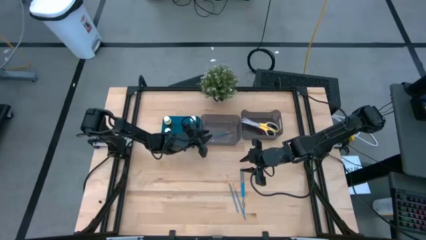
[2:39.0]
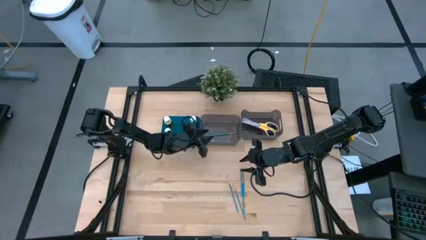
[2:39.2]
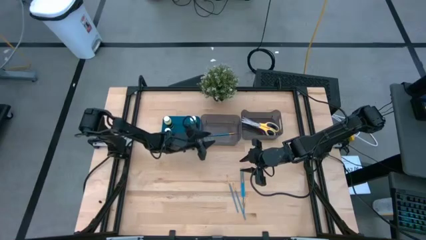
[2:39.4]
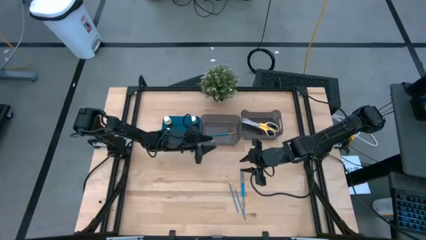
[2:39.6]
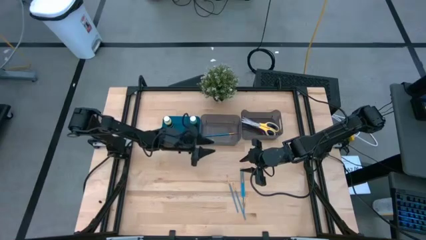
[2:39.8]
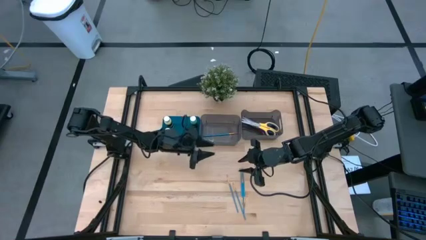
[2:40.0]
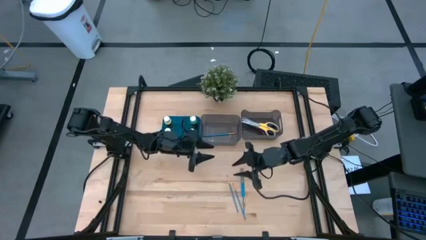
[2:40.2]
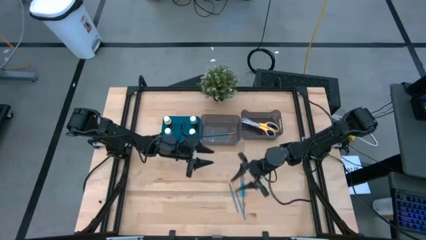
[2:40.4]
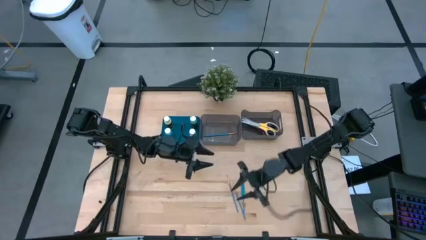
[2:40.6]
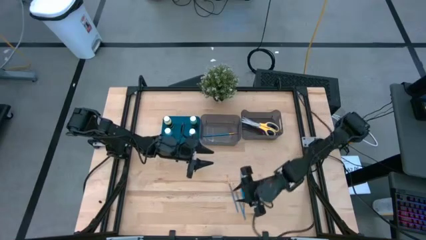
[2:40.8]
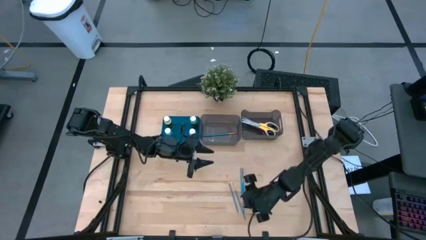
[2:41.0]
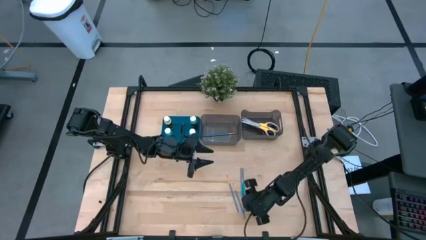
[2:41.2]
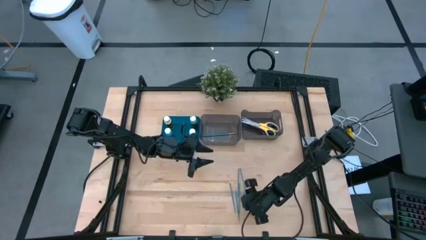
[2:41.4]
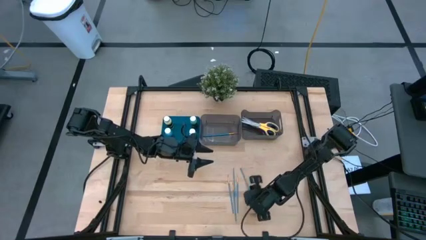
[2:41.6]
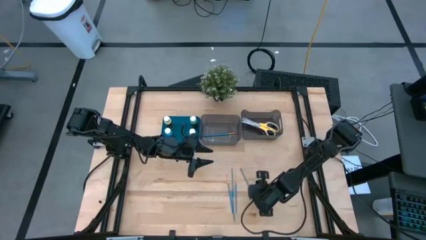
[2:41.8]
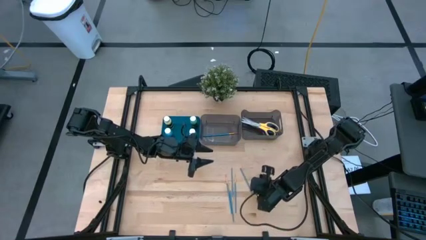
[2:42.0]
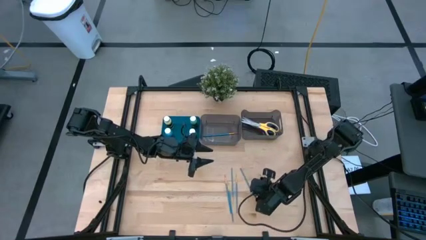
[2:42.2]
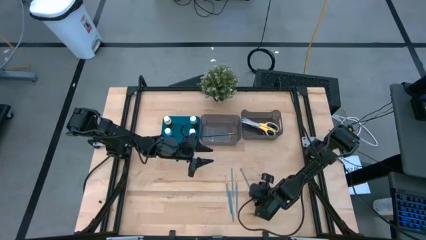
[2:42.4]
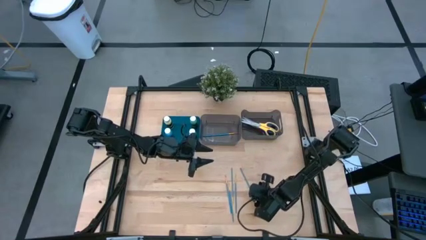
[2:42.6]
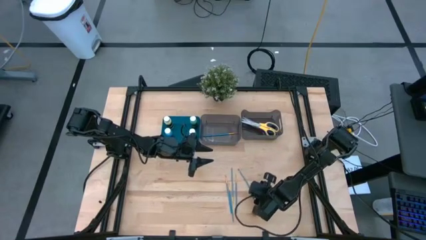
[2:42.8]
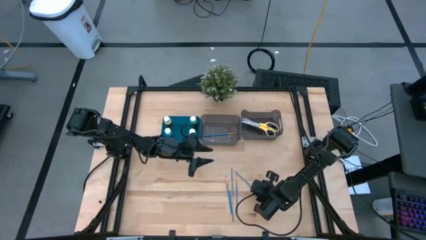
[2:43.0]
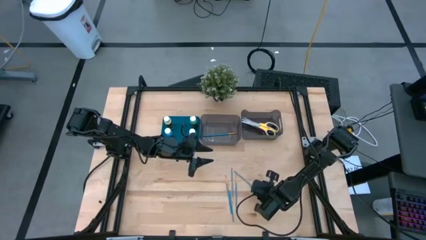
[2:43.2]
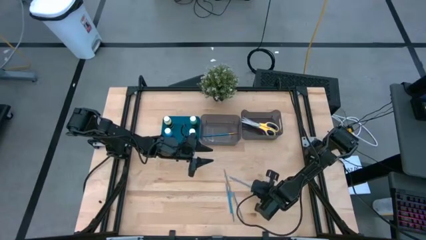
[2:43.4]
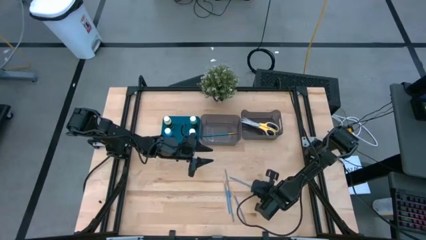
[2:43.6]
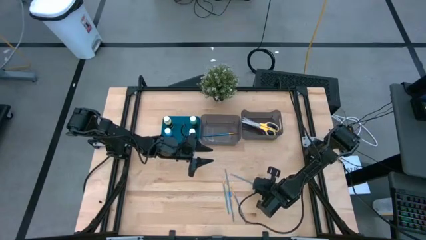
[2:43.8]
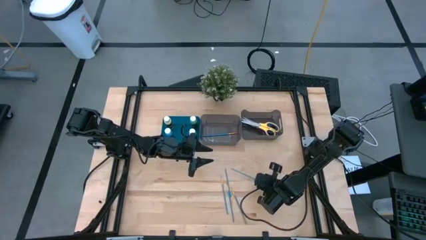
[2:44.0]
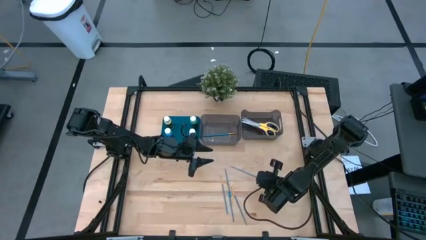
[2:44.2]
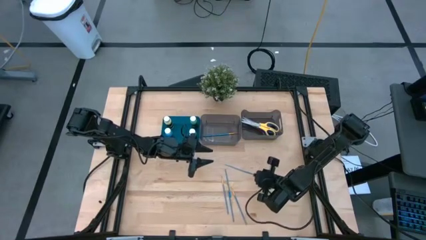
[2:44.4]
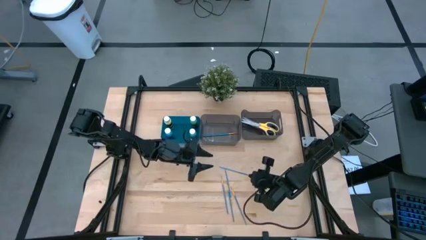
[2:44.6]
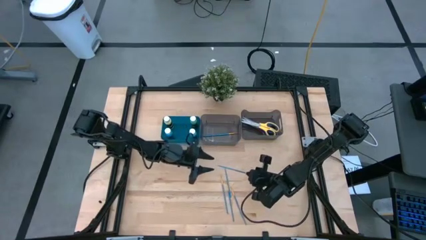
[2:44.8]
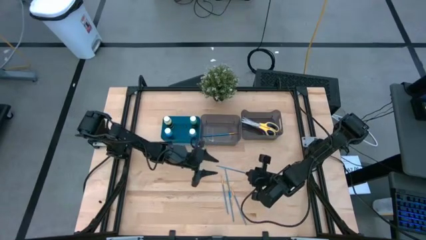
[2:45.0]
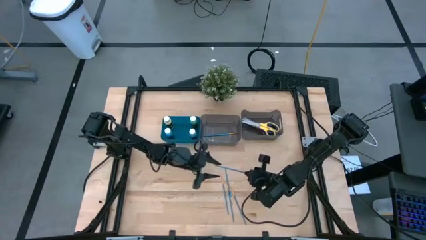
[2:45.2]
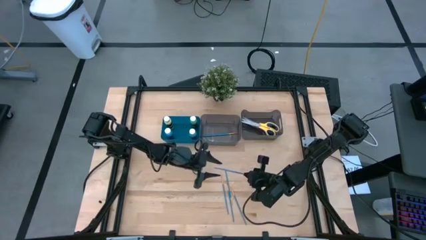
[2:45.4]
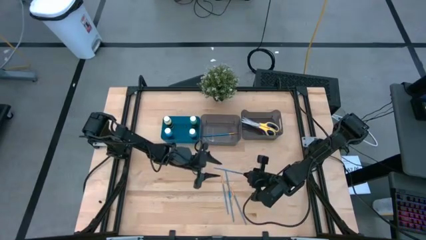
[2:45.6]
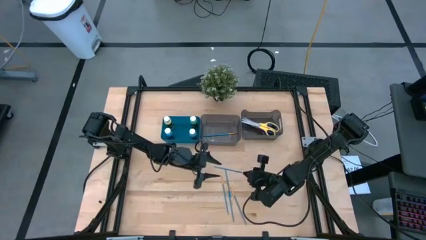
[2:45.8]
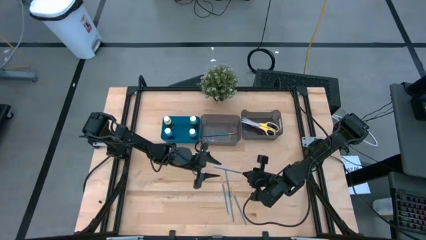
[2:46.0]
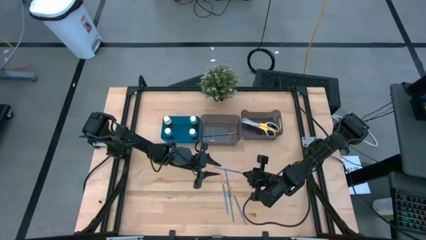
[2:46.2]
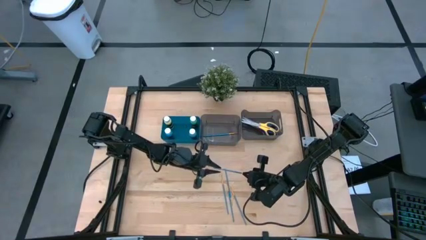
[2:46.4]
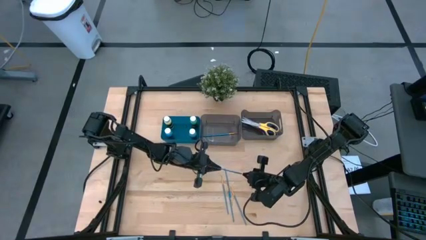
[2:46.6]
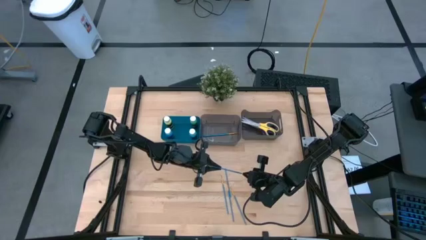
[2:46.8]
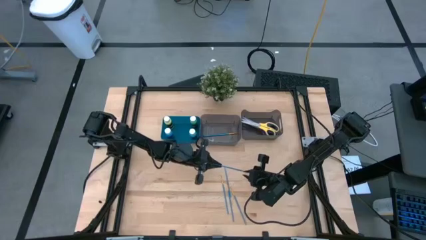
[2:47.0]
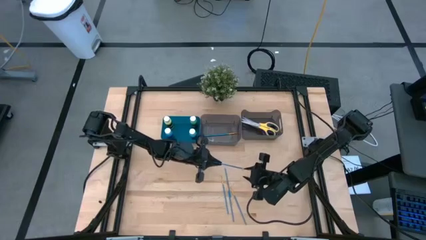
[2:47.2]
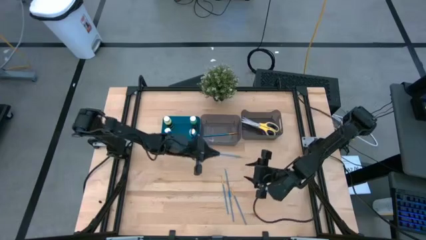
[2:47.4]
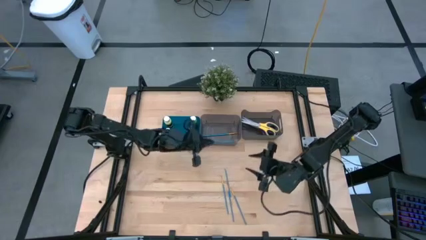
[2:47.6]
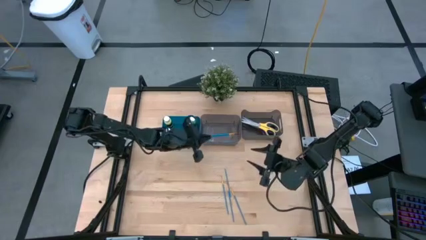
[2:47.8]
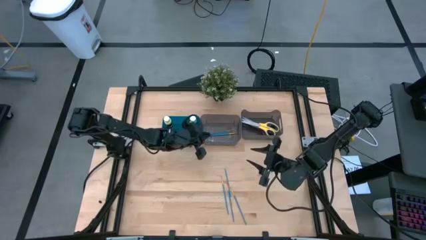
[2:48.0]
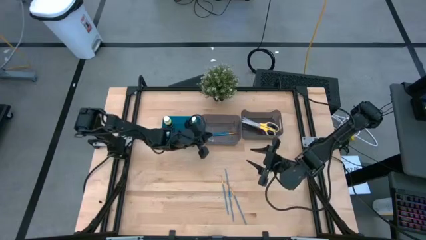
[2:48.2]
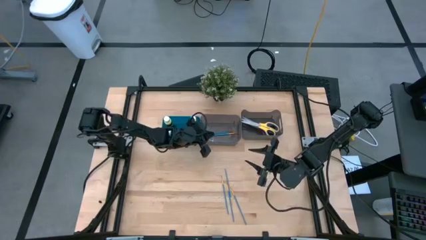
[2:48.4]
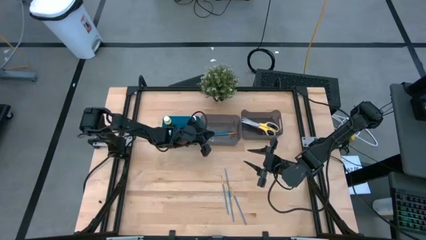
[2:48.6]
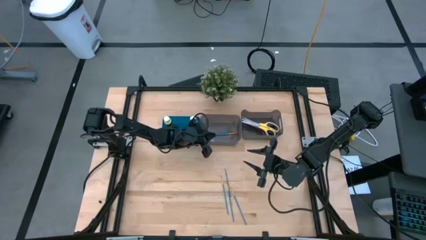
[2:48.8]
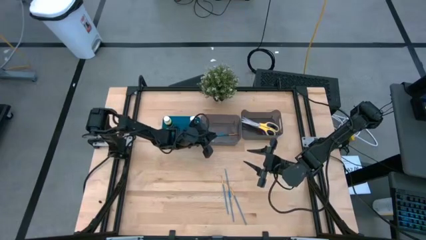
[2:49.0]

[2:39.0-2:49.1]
Task: Pick & Place Paint Supplies
Put the paint brush into the left black bin

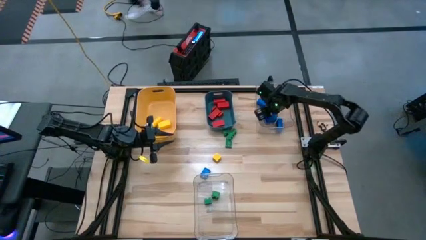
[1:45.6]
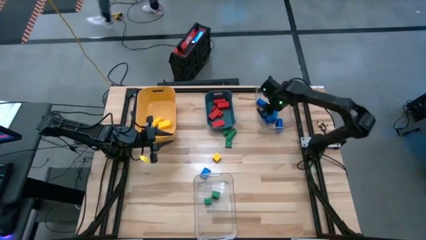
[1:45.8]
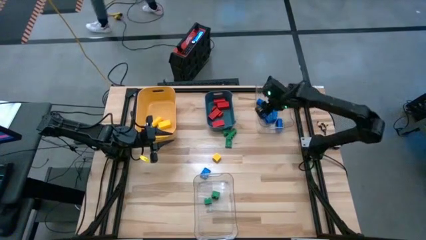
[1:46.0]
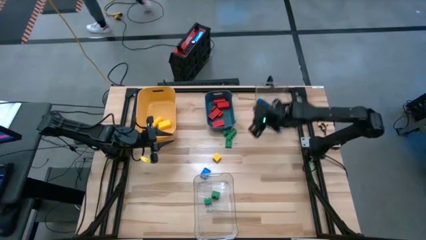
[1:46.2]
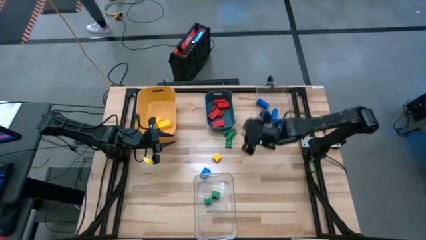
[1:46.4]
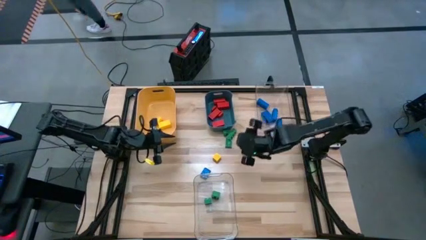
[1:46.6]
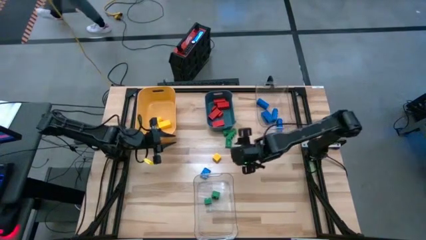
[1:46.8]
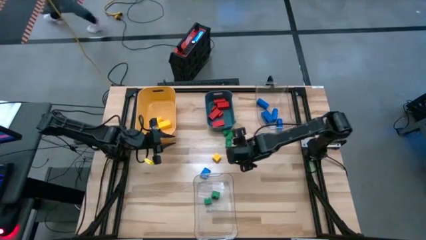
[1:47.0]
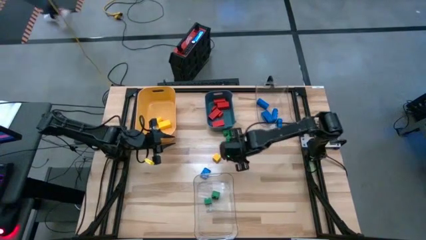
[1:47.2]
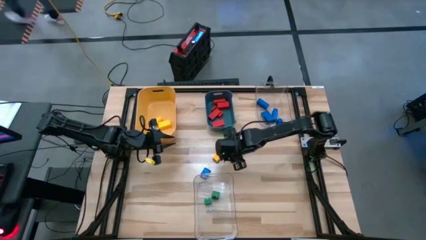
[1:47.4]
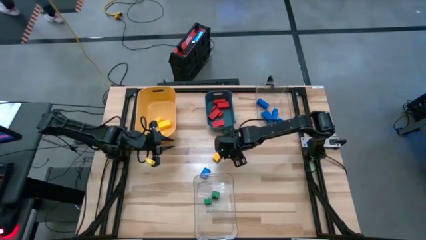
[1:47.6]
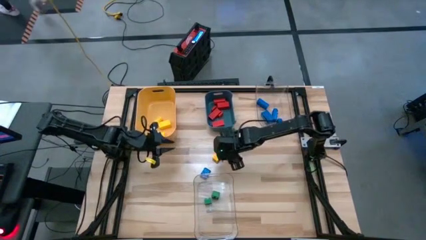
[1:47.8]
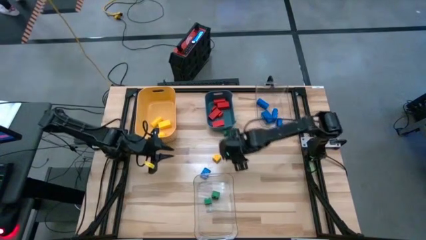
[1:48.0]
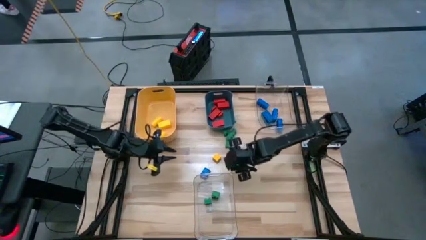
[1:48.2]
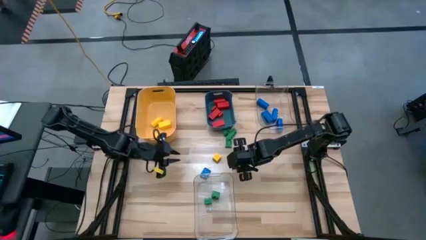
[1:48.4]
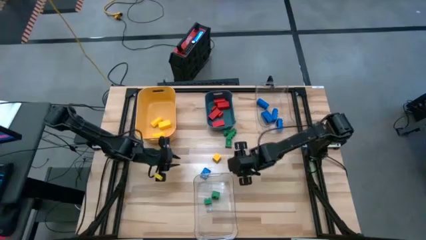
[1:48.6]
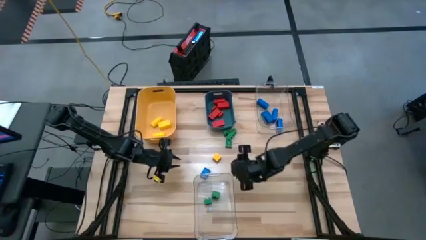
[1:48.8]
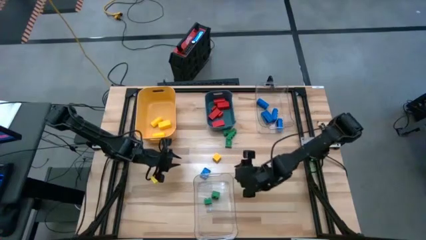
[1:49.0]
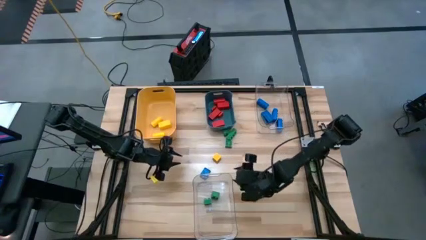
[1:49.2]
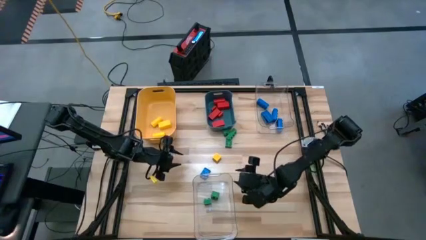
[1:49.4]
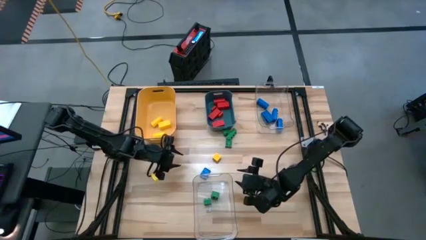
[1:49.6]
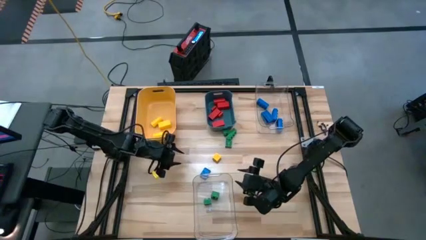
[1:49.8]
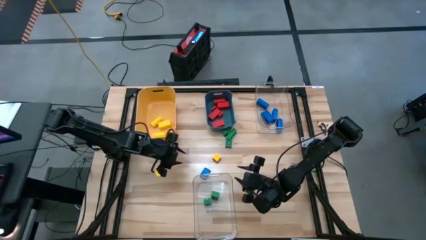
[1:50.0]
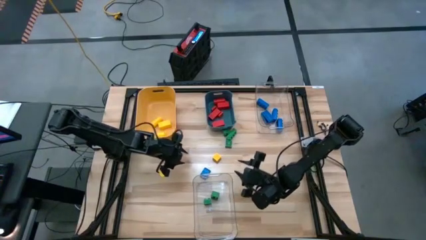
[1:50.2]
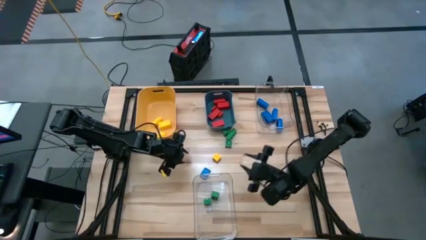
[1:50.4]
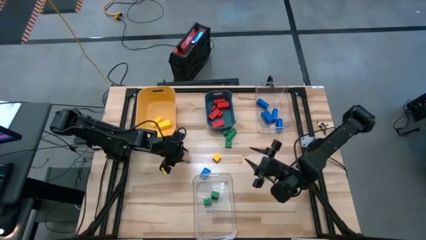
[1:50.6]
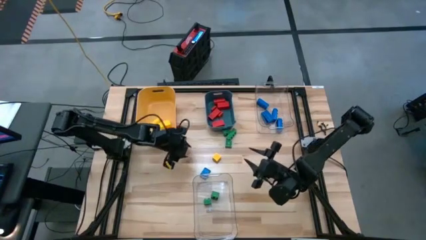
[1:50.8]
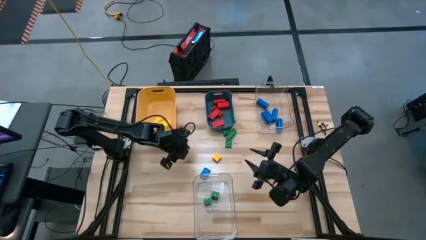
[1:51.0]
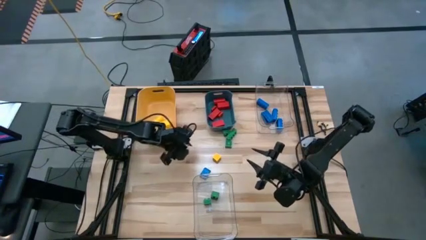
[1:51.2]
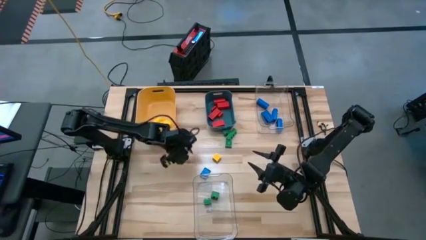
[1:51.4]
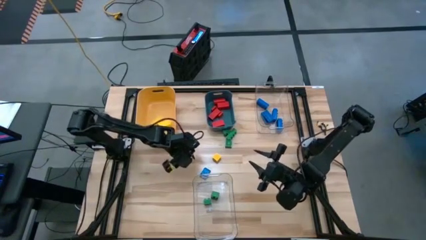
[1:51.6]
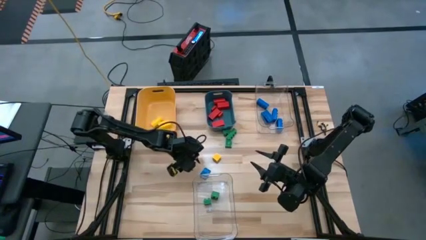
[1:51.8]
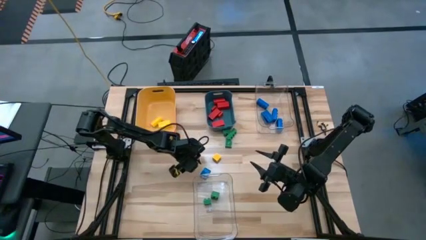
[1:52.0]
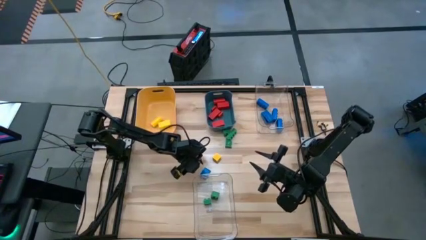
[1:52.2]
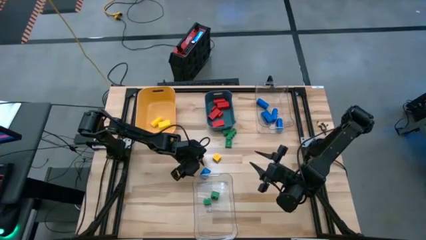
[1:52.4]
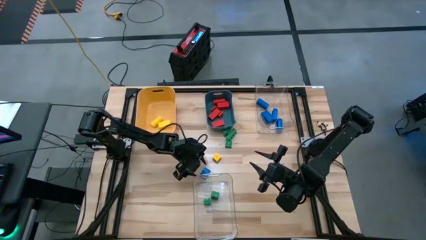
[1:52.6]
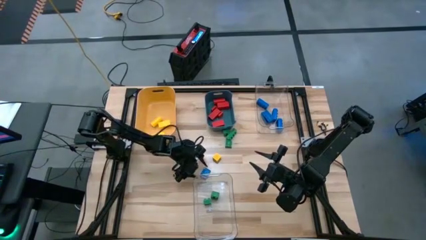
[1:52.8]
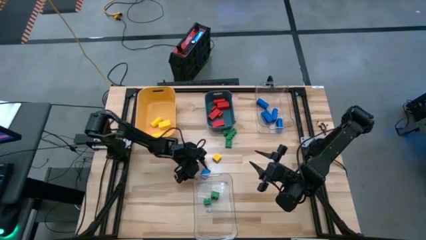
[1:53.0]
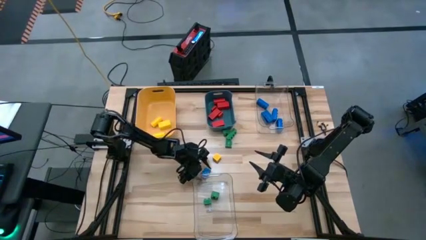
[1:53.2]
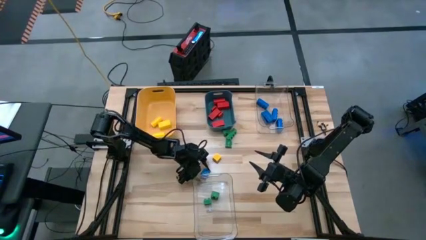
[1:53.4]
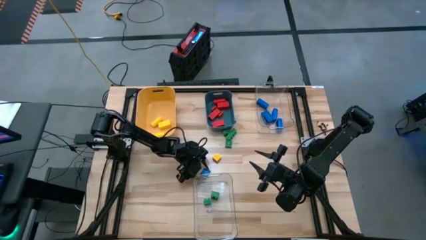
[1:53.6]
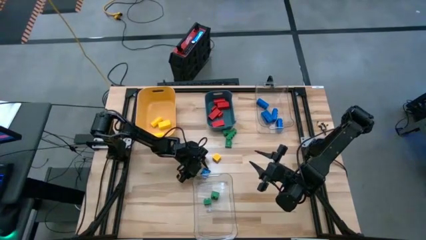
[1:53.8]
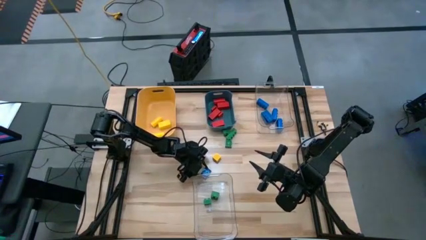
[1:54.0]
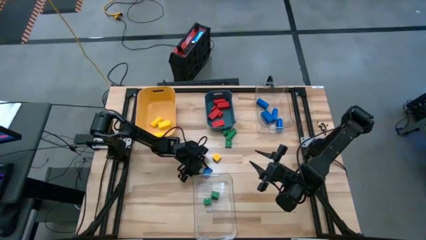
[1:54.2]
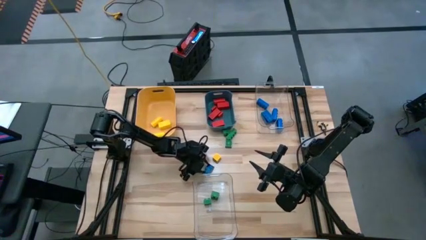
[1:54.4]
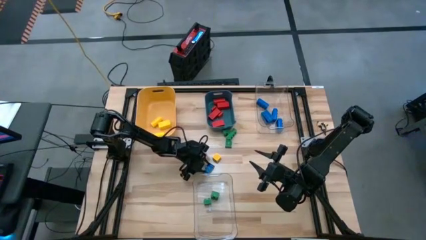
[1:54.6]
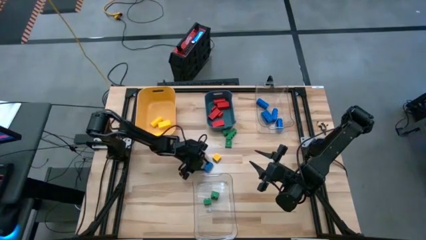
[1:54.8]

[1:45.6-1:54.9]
Task: Sort blocks
Put the blue game piece into the top transparent bin
